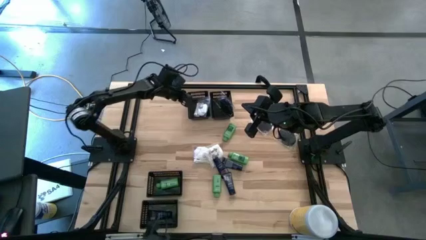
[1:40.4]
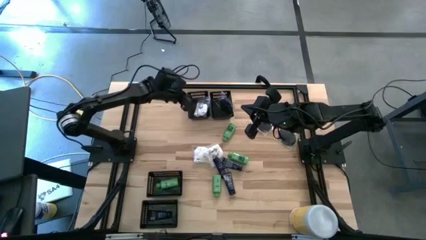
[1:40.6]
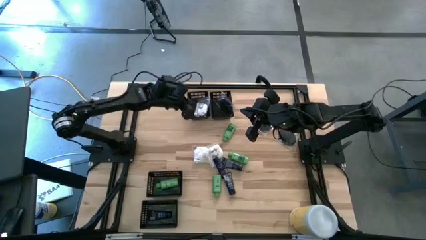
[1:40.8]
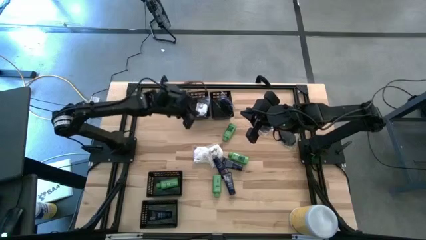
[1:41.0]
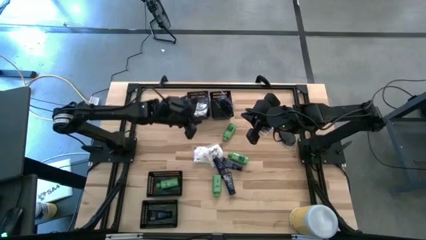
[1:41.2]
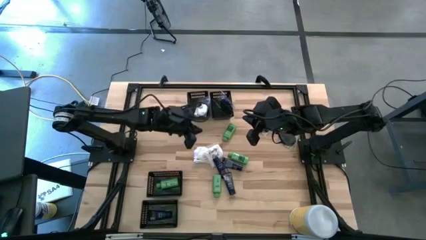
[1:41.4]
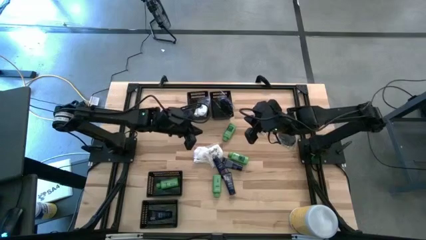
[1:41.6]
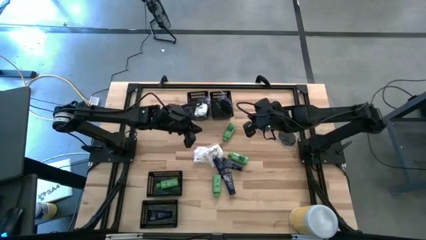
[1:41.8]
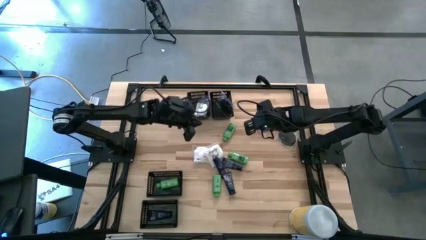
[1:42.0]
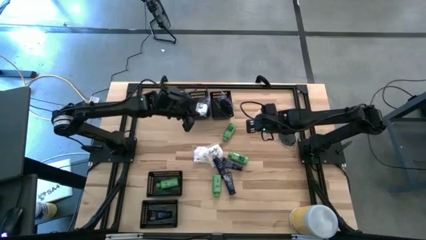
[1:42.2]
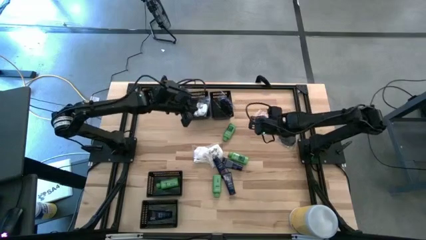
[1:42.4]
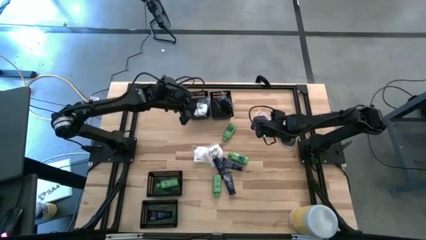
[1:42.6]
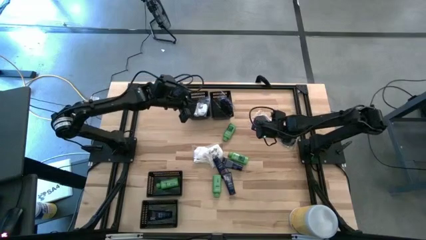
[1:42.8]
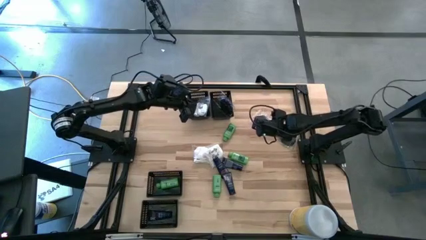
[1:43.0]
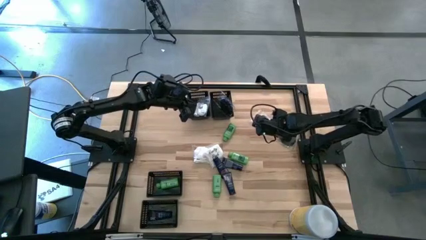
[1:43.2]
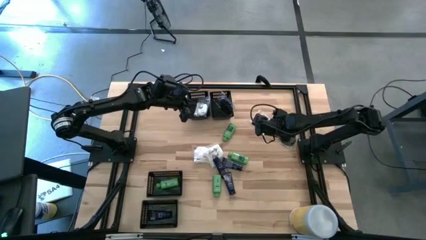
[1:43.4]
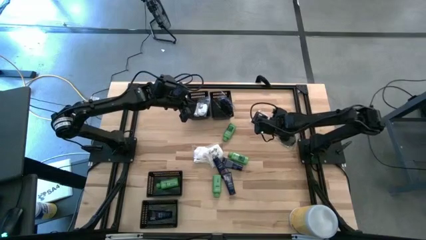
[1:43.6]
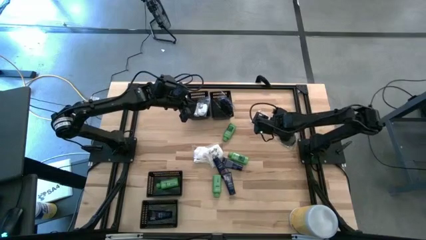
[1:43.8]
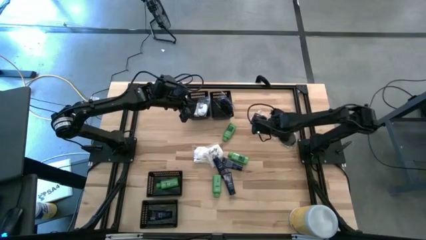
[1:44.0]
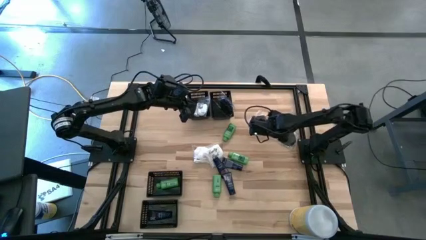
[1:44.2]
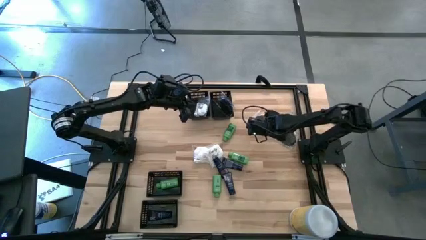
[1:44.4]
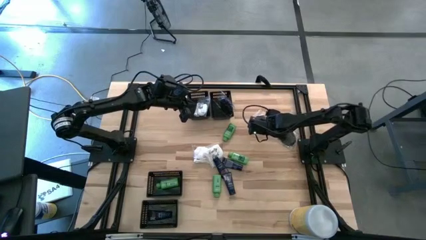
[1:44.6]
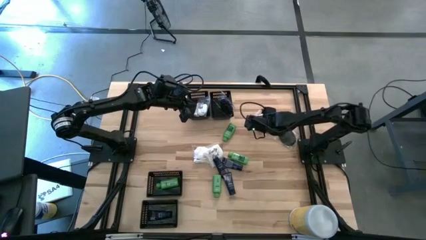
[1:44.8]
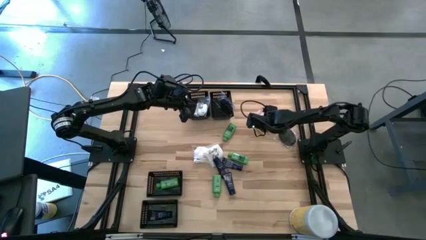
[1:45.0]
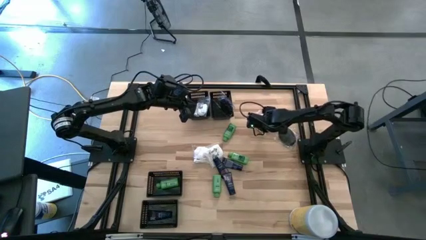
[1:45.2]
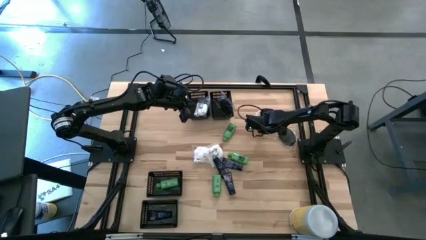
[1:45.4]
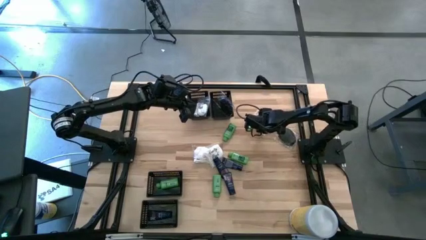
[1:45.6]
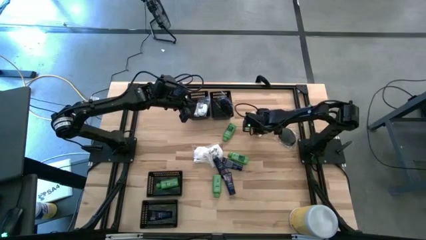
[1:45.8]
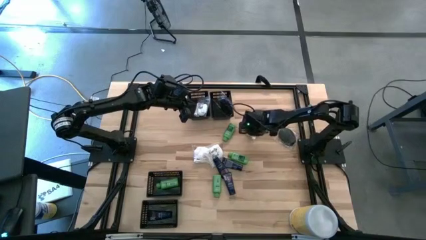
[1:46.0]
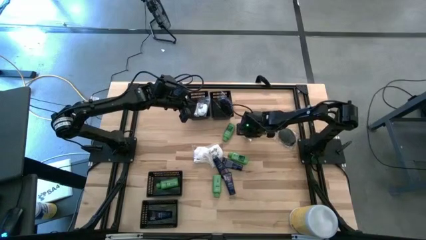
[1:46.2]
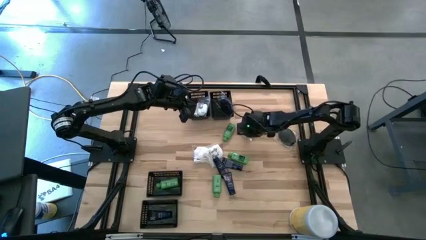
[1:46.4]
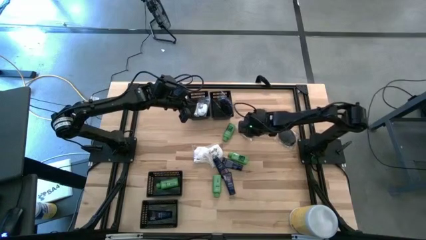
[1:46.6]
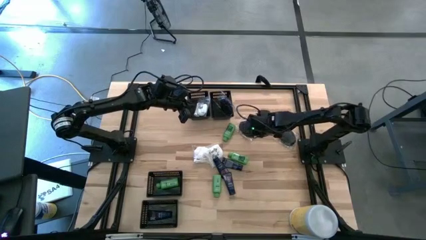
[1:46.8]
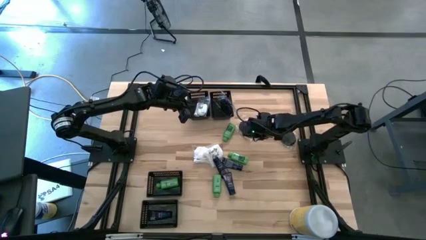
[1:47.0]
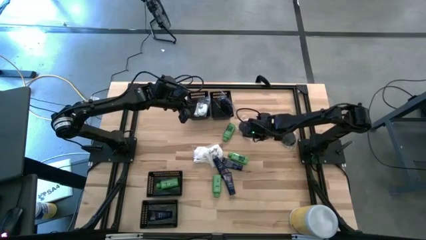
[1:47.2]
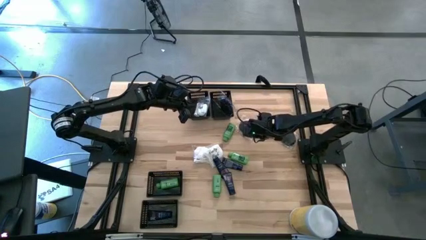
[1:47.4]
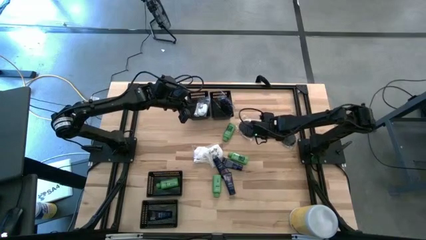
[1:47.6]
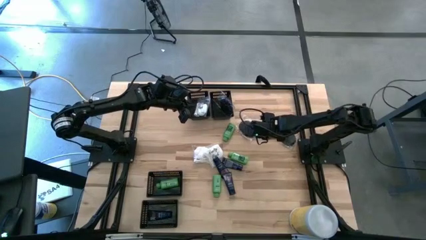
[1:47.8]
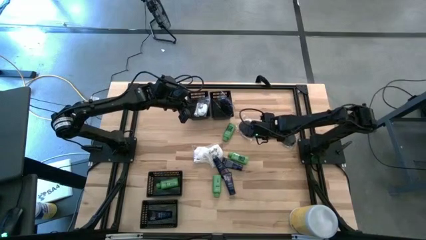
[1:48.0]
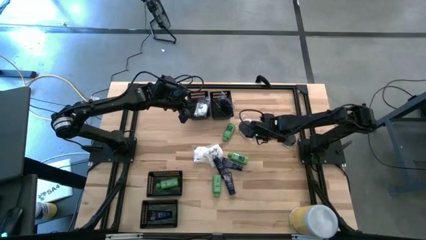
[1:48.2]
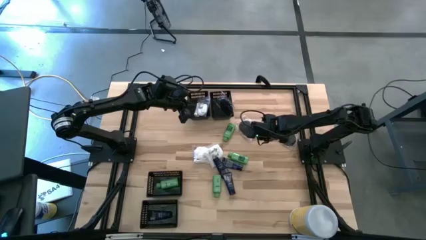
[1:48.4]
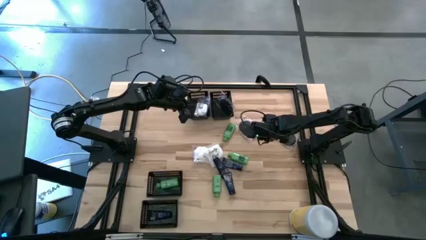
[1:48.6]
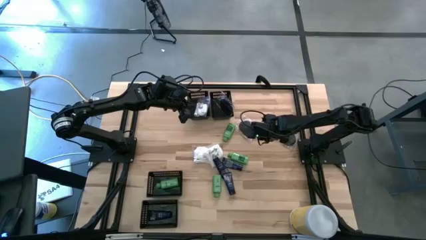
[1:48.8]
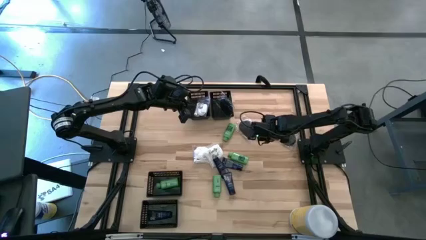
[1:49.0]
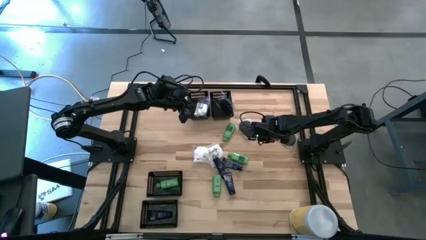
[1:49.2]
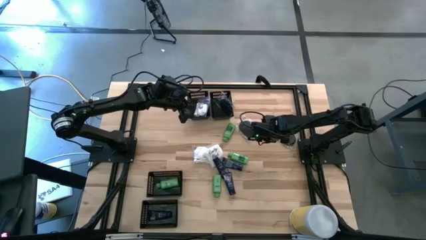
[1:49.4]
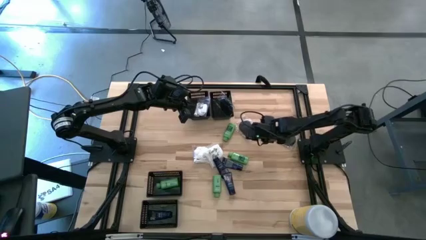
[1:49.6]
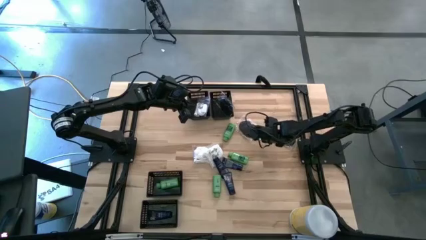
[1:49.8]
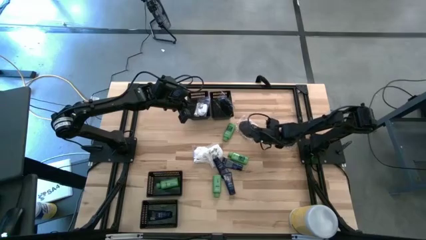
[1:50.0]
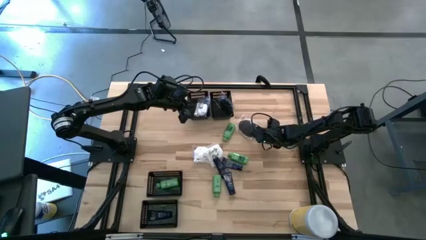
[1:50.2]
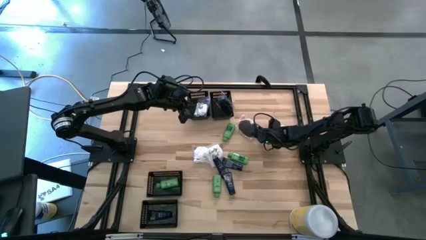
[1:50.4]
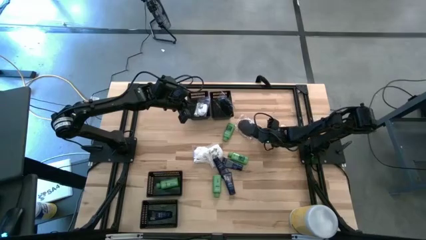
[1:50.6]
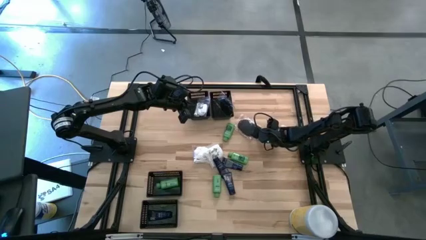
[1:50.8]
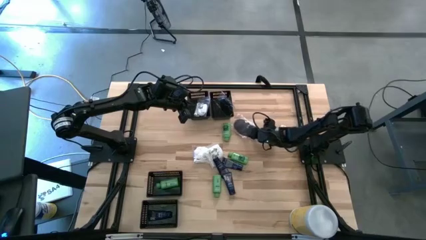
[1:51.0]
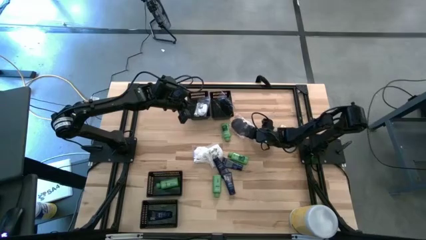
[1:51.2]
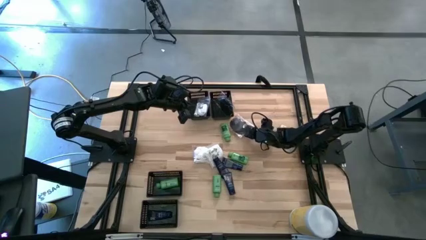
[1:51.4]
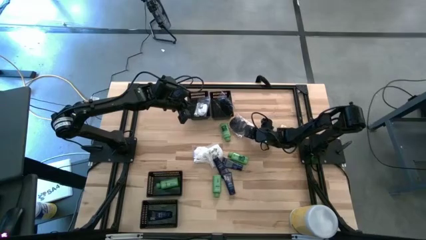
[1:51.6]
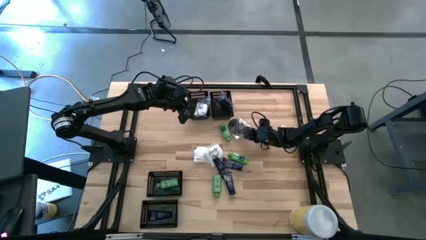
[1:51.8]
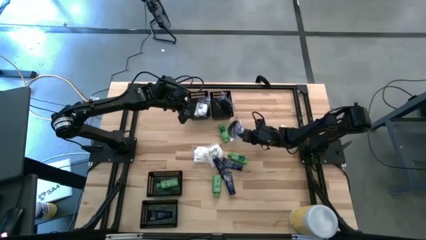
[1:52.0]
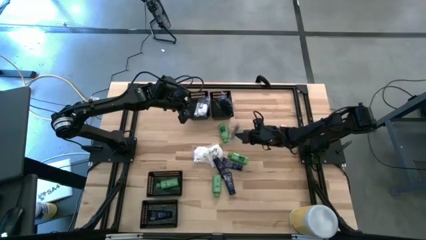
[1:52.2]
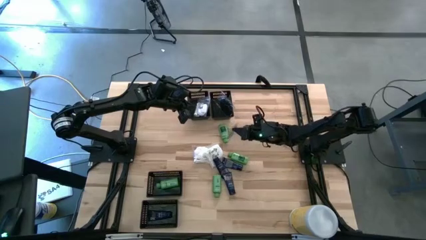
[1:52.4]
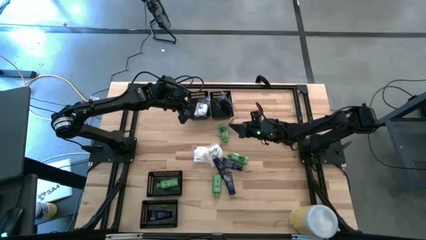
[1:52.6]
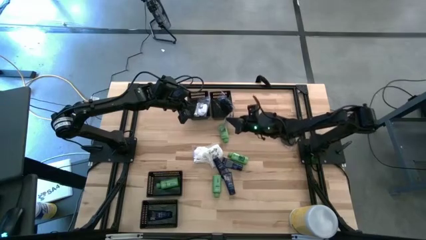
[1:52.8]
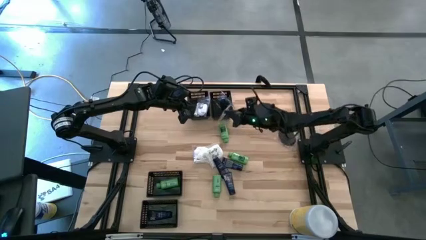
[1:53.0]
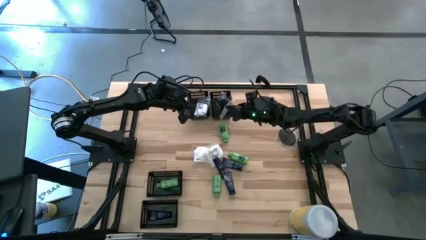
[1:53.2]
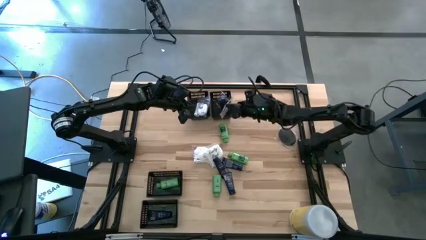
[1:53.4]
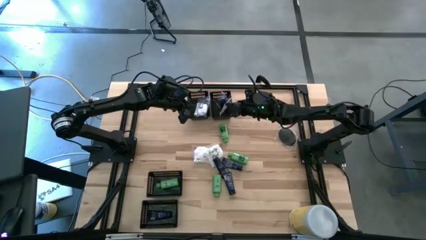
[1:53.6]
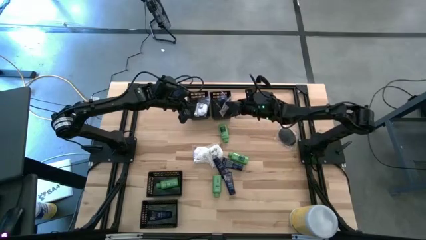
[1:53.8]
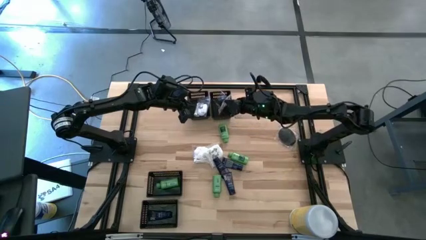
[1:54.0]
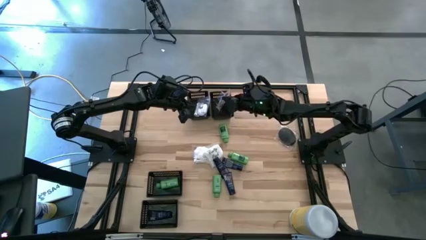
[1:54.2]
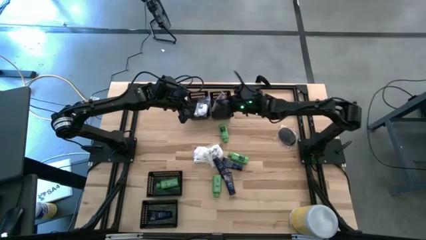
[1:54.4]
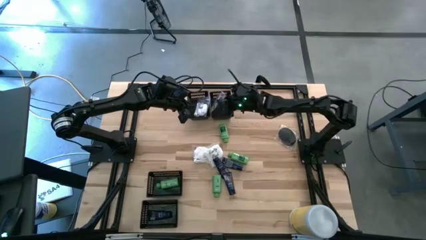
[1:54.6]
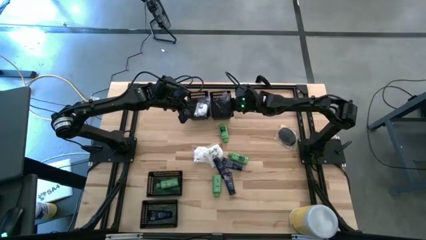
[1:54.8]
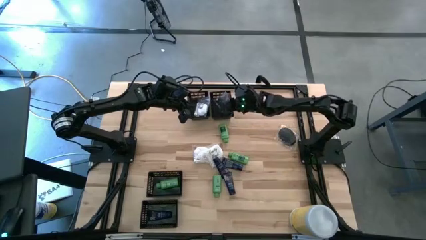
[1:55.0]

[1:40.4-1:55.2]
Task: Pick & Place Travel size toiletries
Put the black hairbrush into the top right basket
